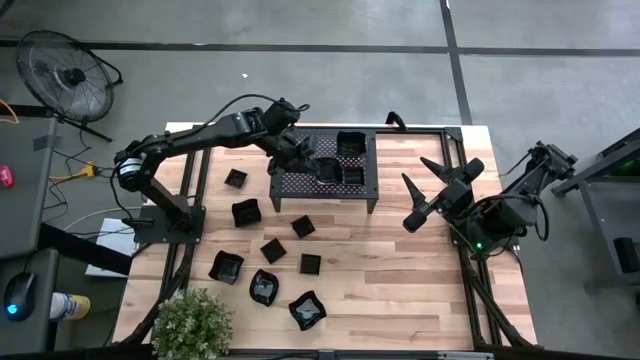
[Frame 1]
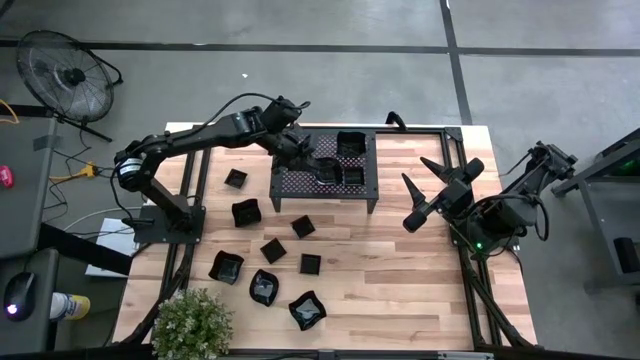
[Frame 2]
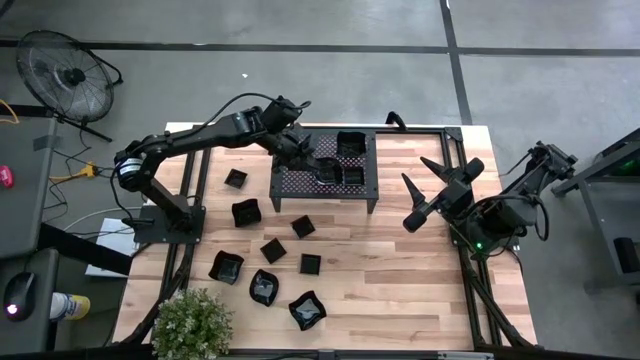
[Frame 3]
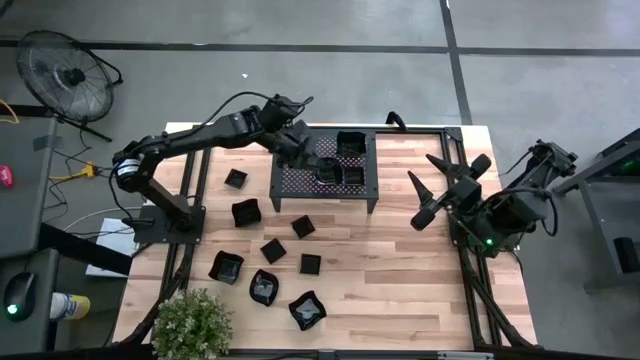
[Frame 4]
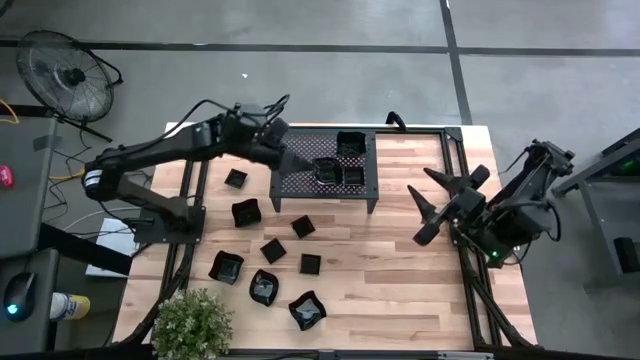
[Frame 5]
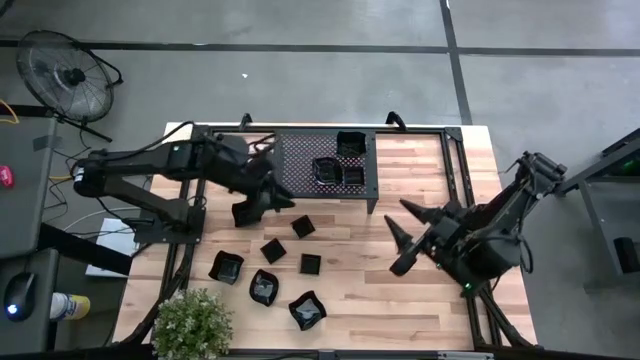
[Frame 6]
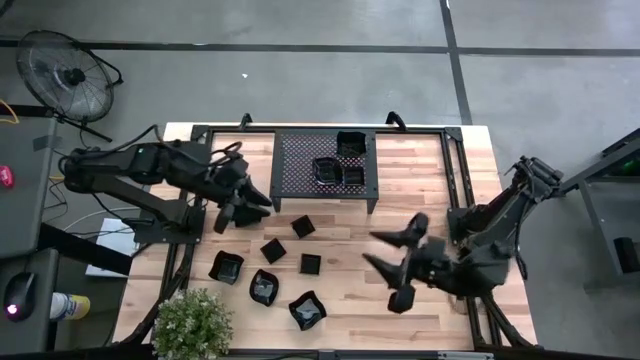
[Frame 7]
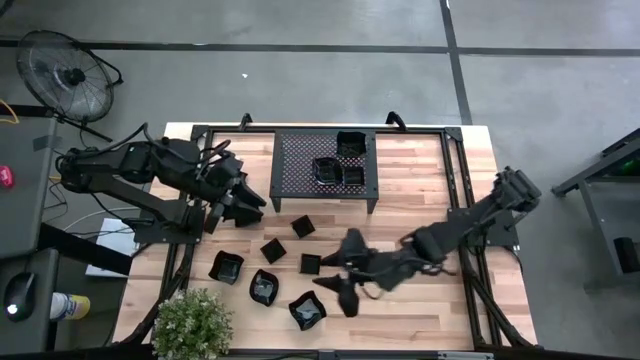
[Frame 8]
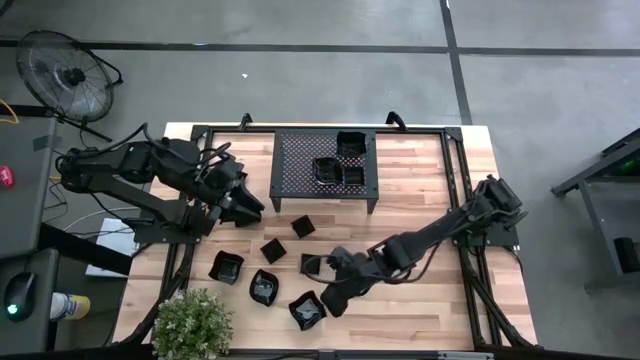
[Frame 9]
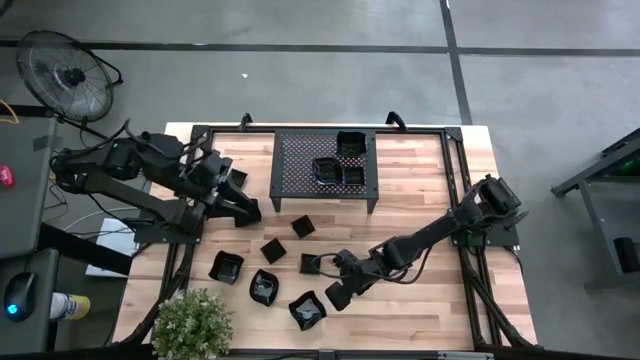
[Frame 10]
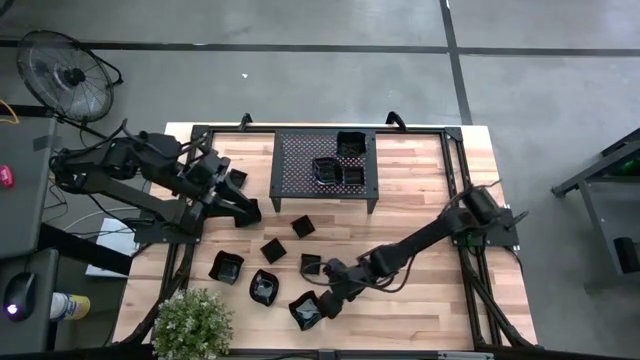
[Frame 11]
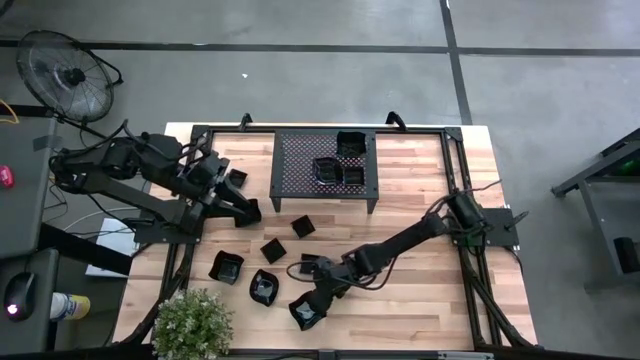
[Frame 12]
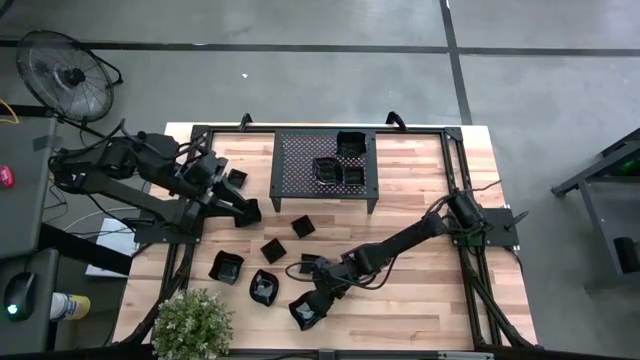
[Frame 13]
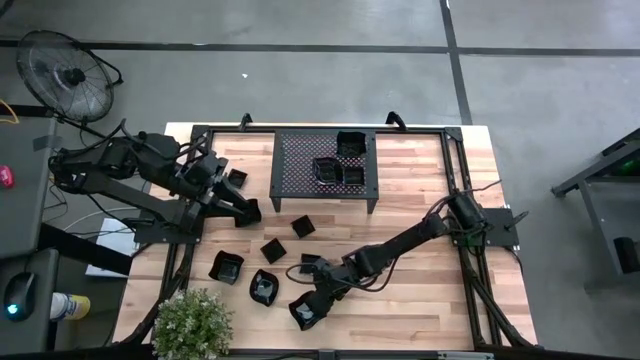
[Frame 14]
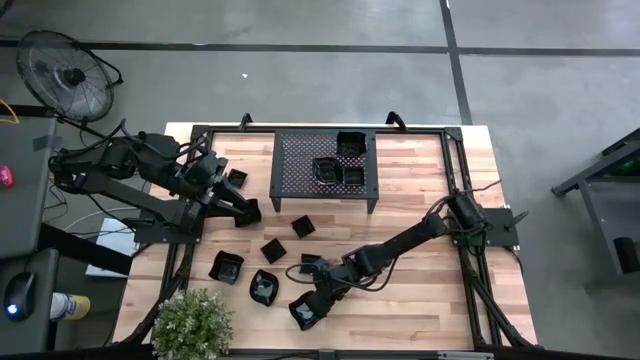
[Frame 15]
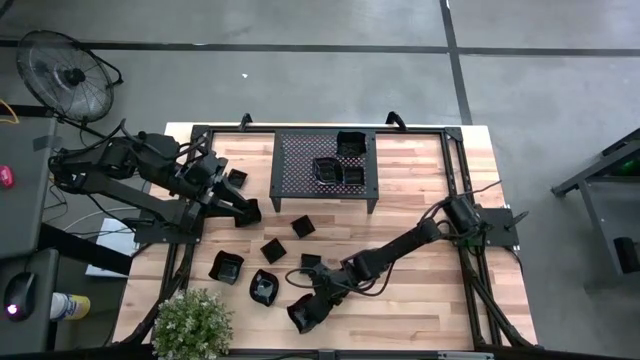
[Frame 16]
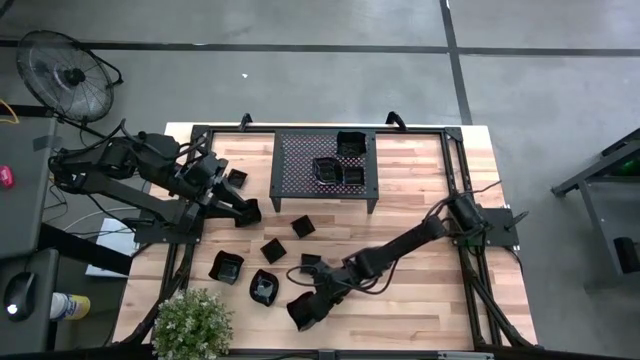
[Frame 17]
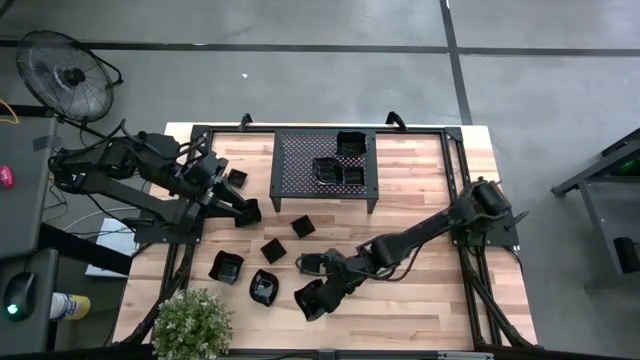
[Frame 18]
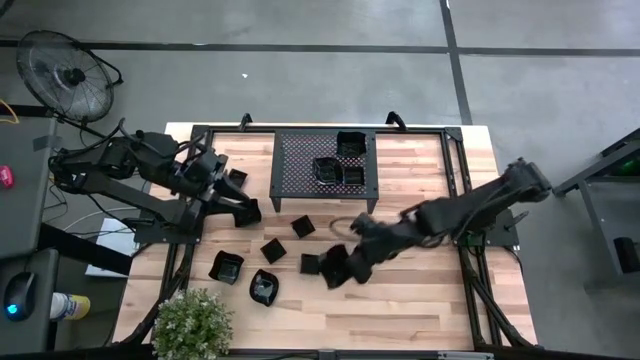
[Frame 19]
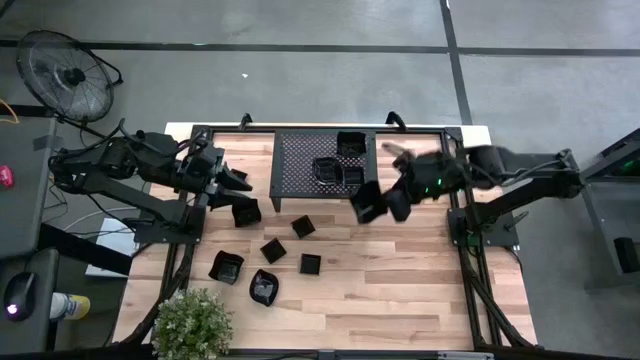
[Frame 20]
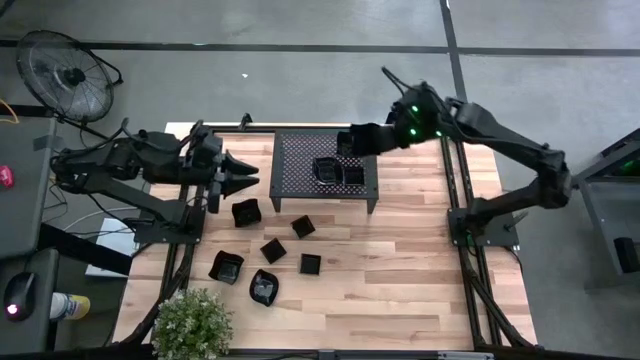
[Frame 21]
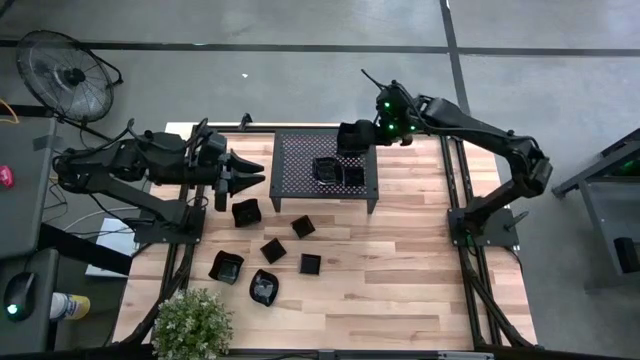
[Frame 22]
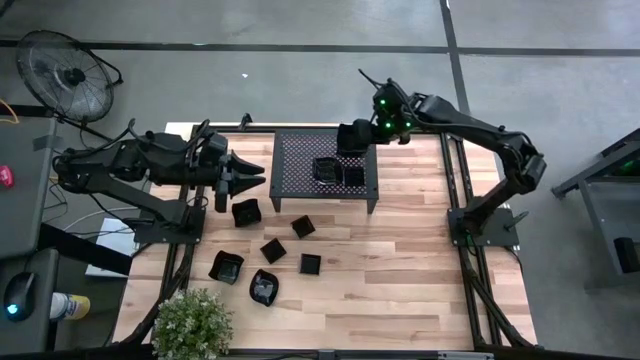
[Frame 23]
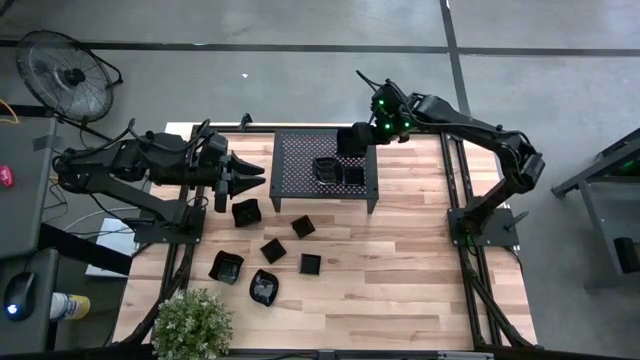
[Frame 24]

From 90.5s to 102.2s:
Task: Pick & Place Mini shaped plates
Stack the black distorted square plate on top of the other black distorted square plates on the shelf

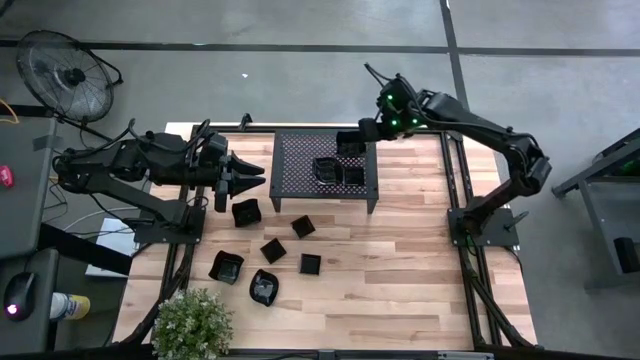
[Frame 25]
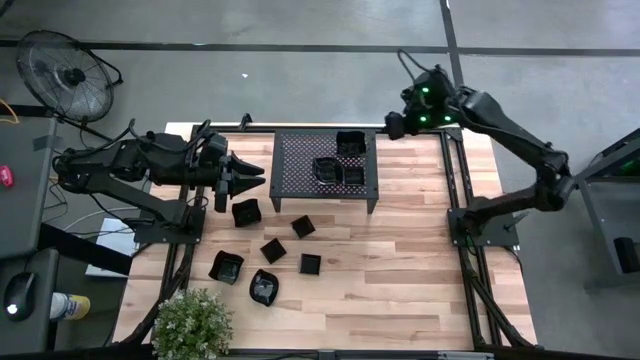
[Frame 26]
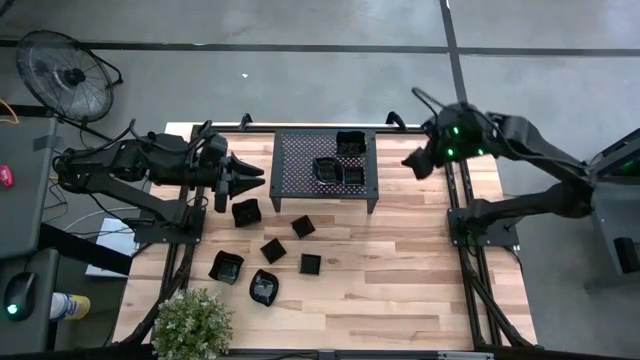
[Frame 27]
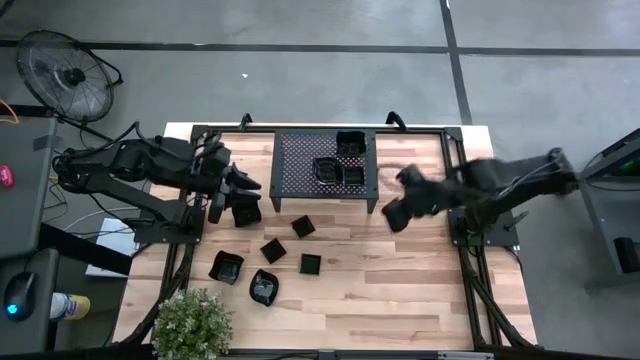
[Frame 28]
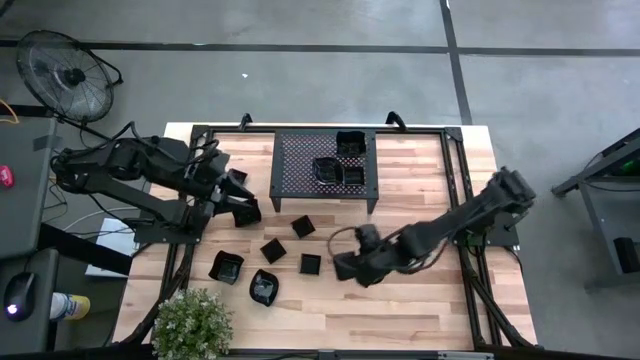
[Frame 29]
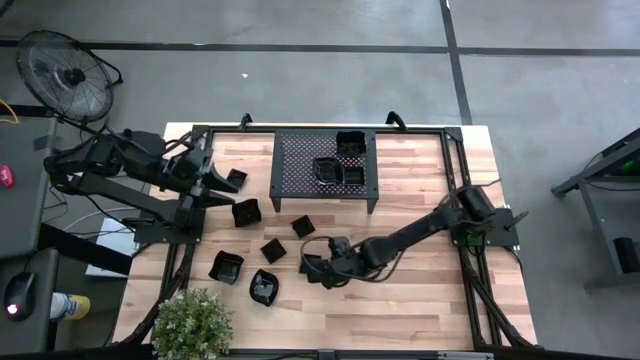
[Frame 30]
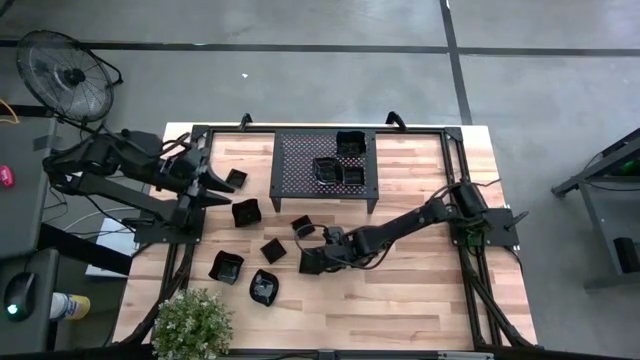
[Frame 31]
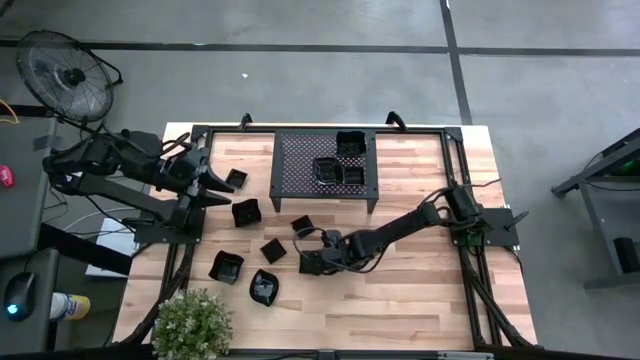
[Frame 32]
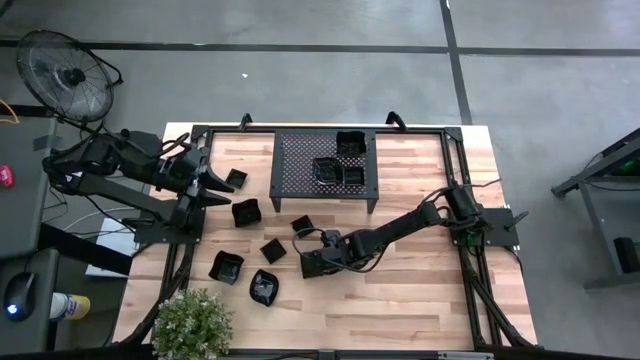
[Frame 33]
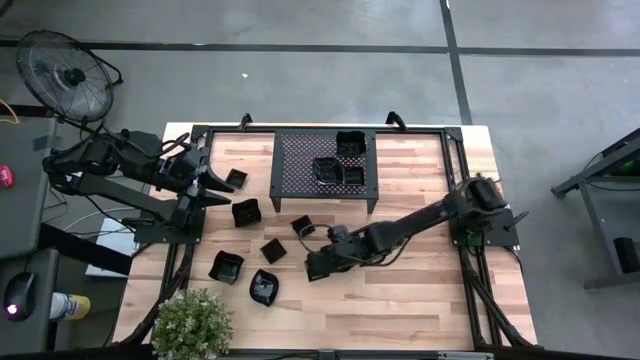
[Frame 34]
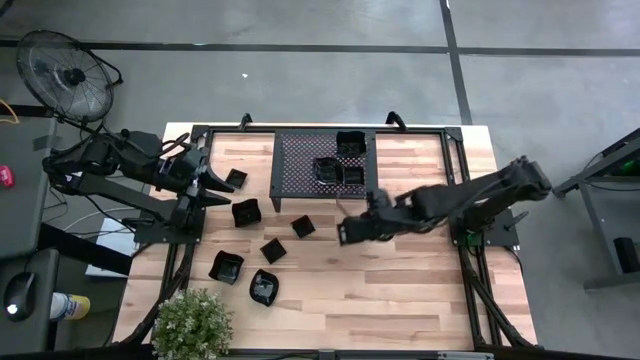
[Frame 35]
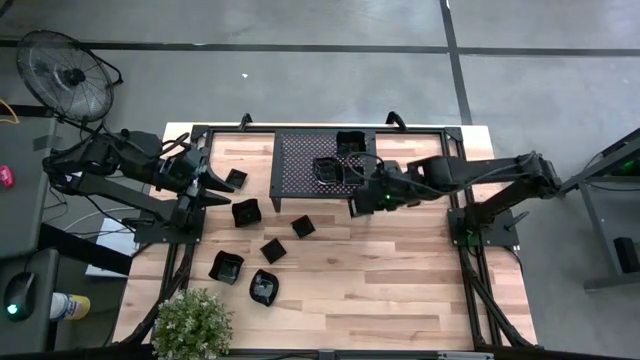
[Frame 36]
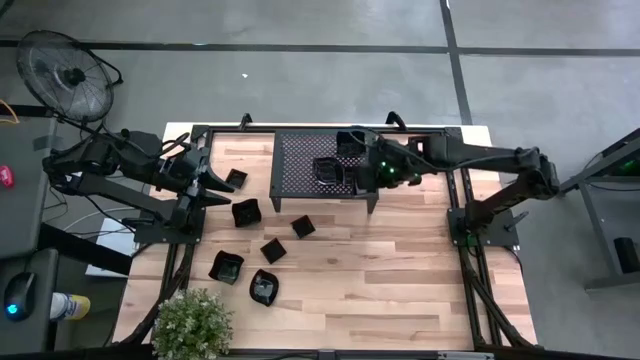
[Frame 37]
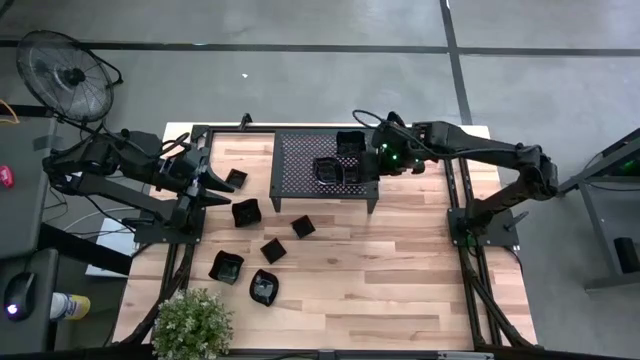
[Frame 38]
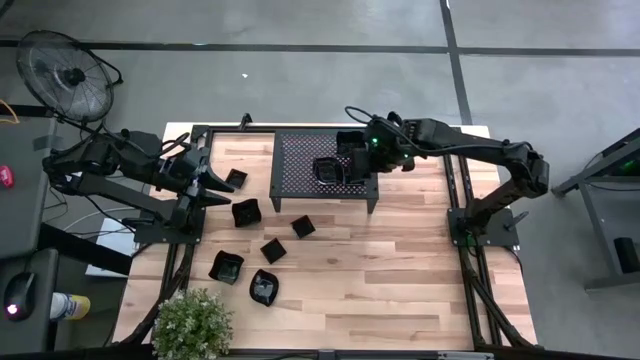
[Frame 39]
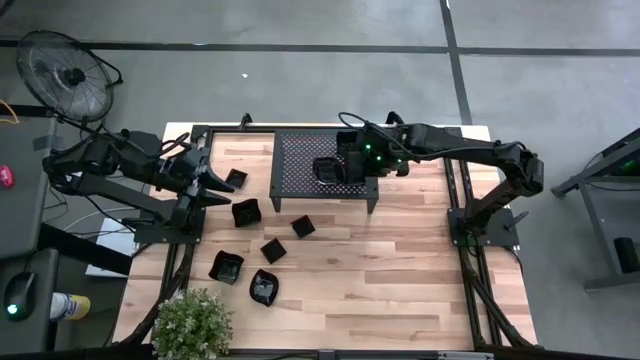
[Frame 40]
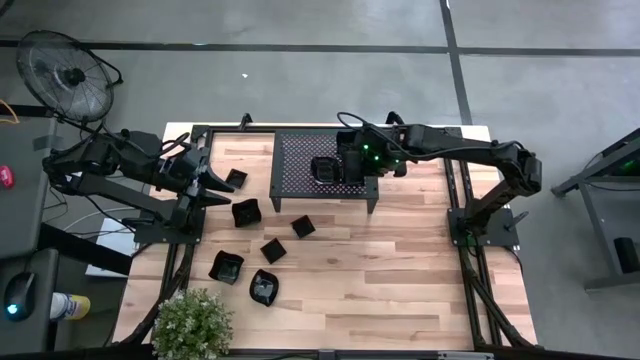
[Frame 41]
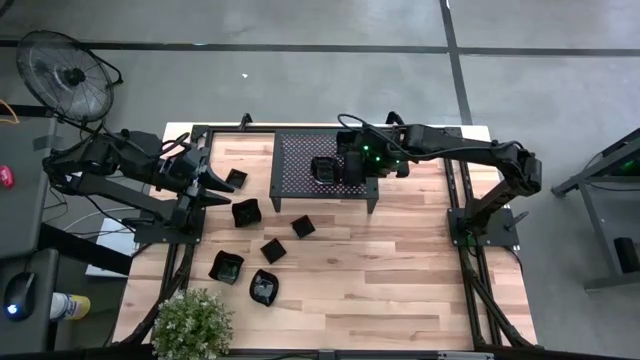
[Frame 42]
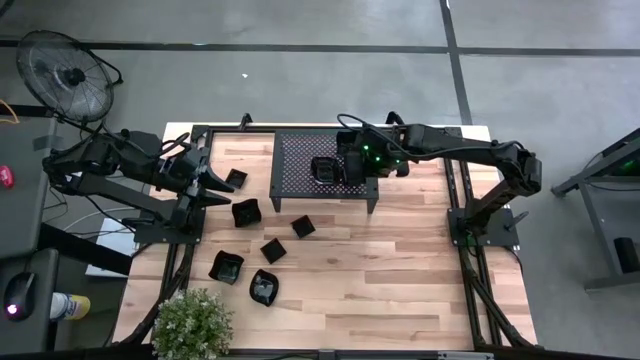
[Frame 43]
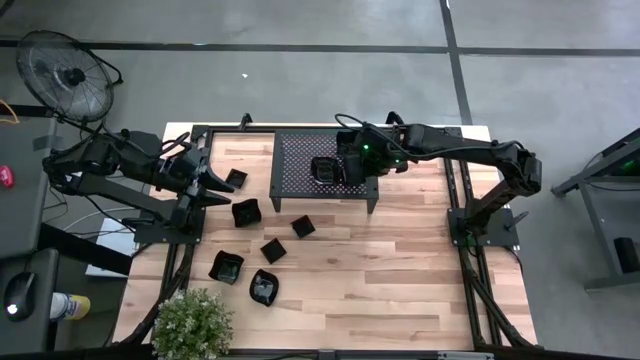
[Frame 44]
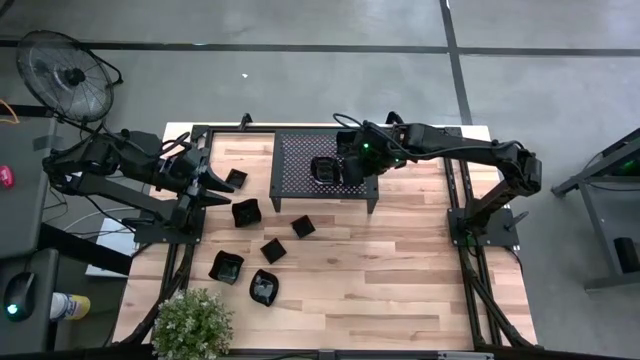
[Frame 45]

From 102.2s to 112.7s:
Stack the black square plate on top of the other black square plates on the shelf
